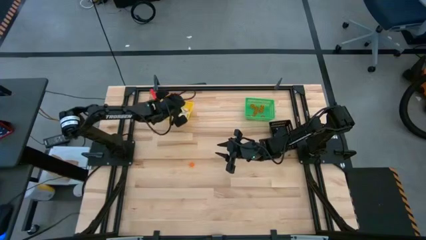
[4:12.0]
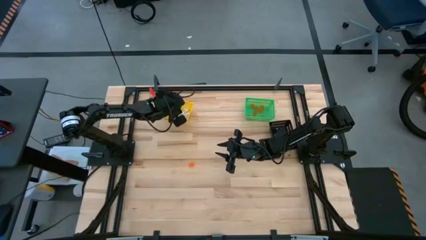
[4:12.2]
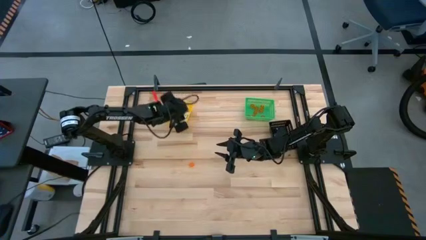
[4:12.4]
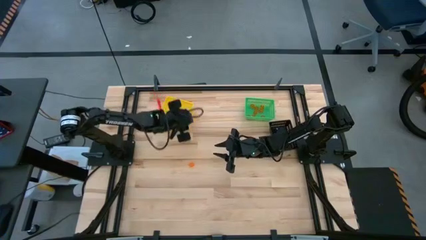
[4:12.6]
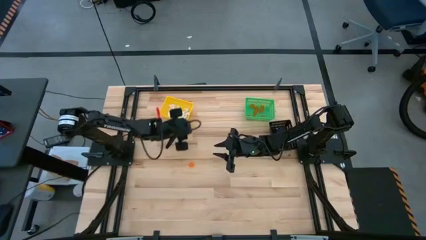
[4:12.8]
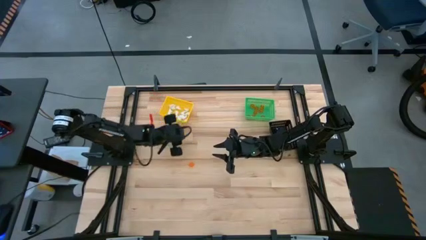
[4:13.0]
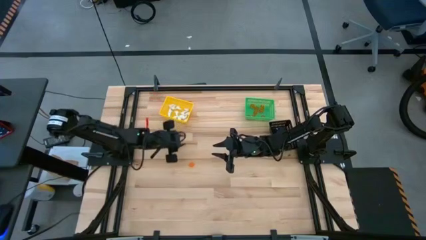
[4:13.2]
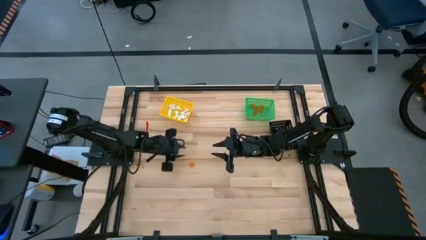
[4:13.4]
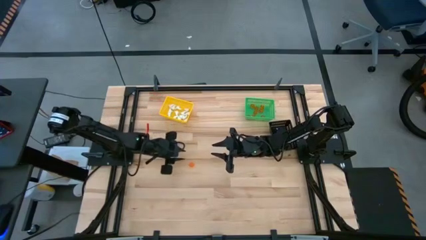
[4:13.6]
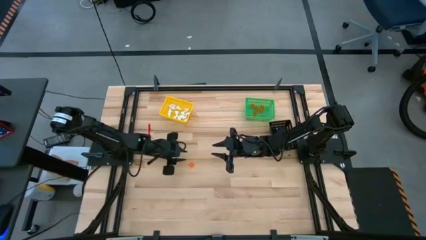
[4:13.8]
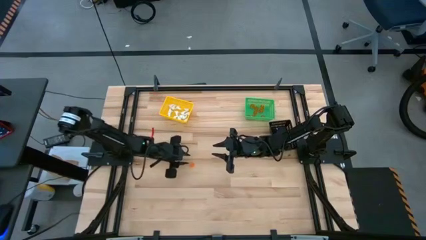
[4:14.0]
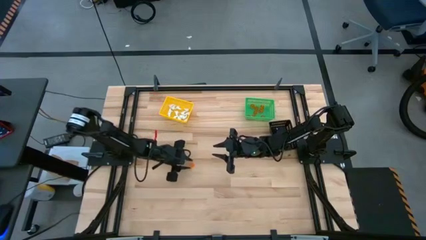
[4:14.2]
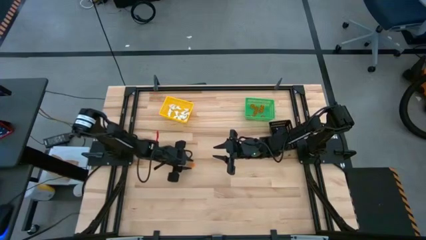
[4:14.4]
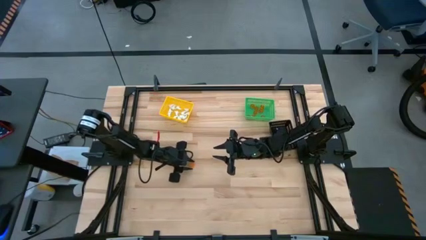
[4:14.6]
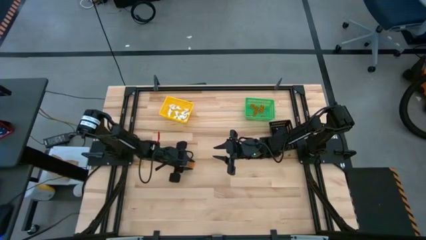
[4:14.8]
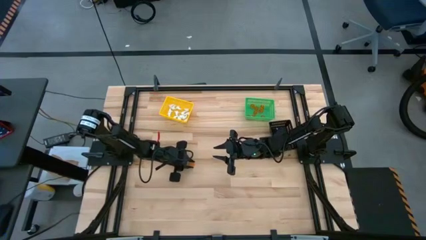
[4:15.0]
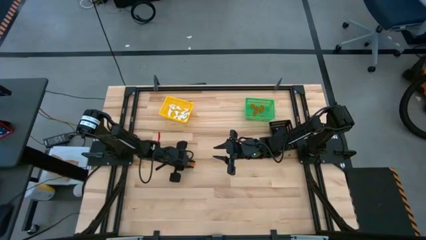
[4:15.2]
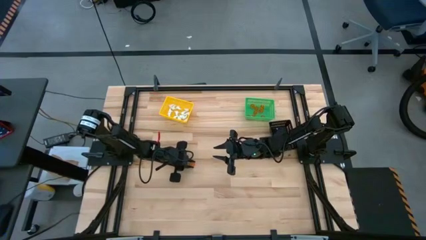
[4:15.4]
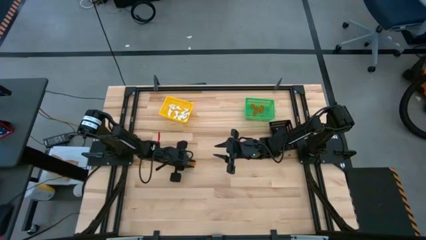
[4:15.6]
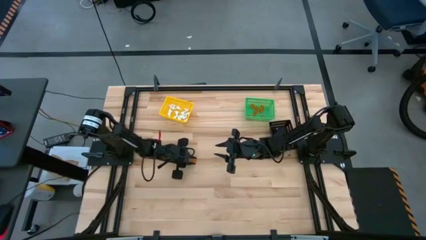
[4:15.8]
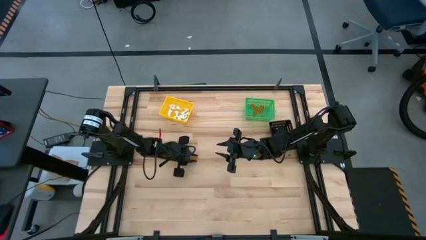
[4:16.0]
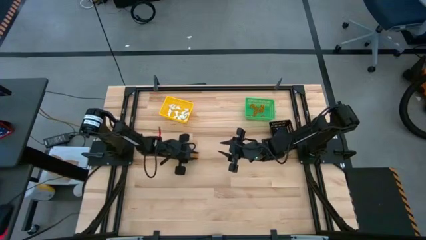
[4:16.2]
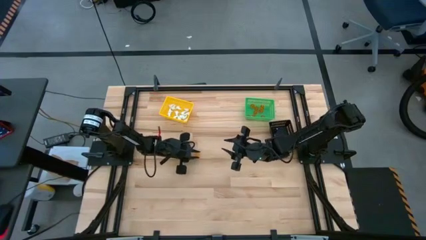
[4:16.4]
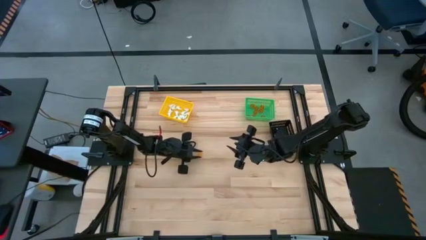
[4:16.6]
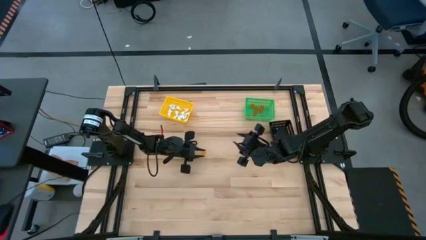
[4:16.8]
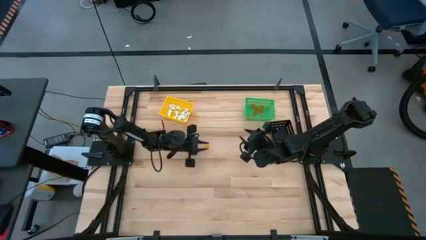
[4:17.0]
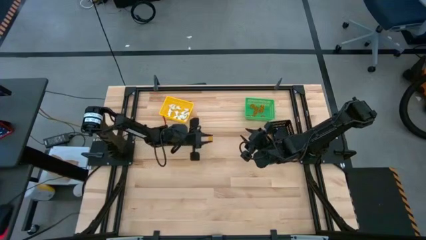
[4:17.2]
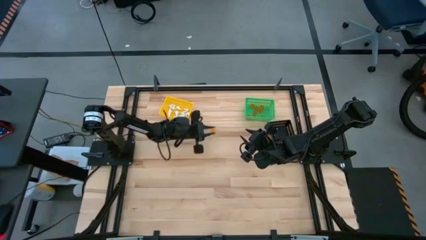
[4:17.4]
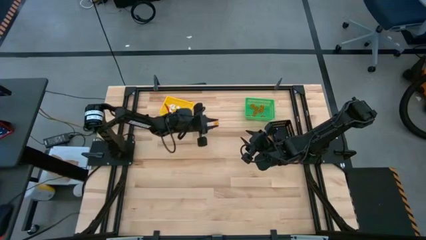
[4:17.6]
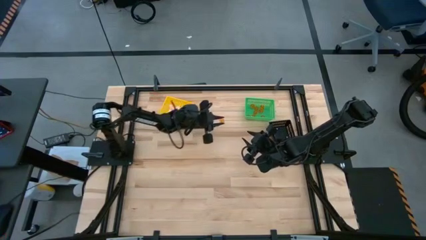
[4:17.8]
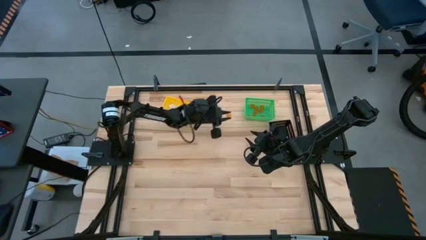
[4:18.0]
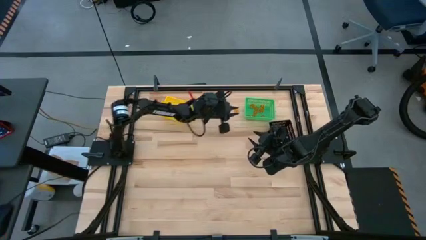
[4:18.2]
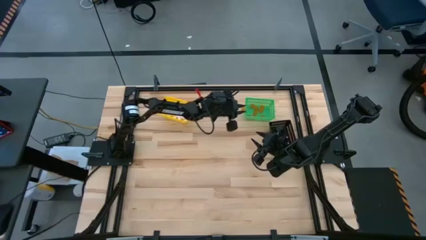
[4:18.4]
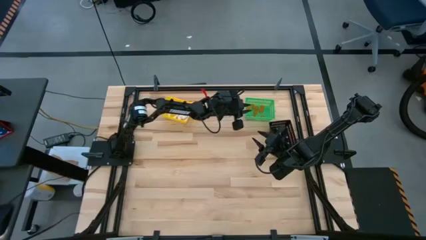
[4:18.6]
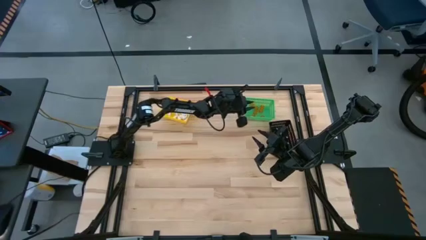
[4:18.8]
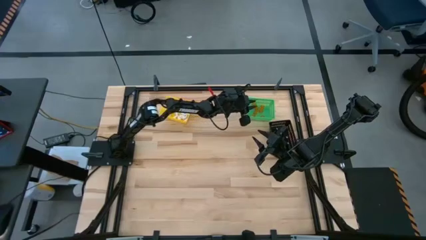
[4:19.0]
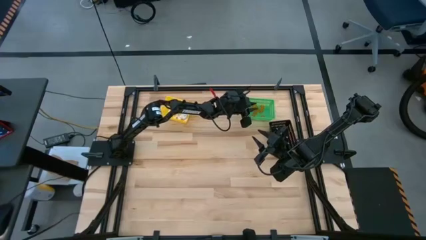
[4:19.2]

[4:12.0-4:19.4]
Task: Sort Halloween decoration
Put the orange pumpkin toy into the green bin

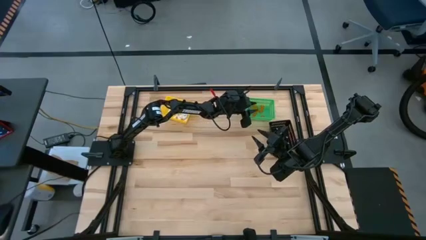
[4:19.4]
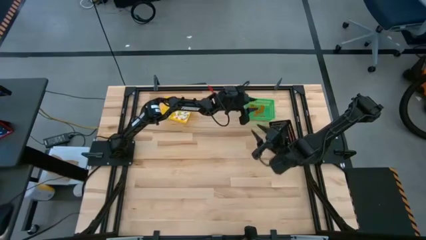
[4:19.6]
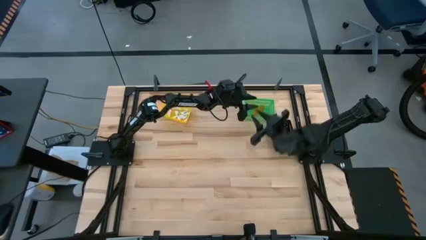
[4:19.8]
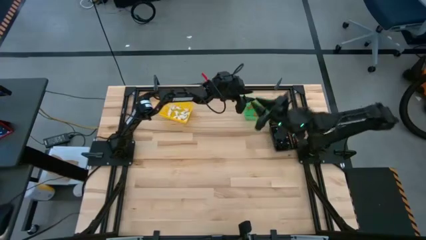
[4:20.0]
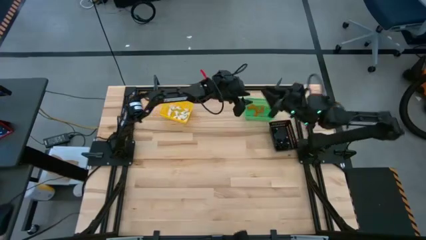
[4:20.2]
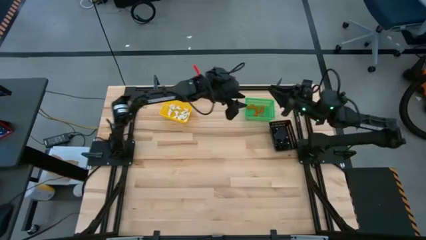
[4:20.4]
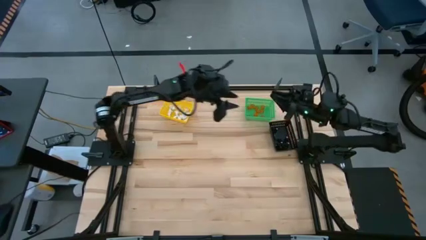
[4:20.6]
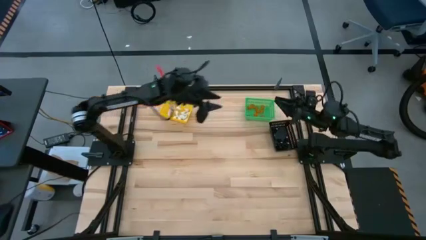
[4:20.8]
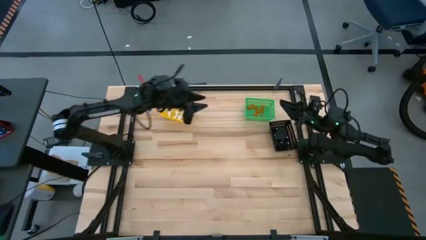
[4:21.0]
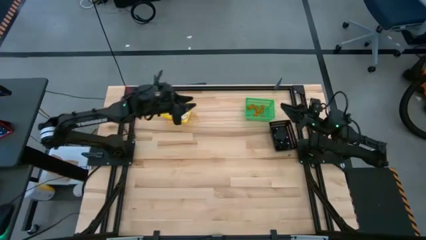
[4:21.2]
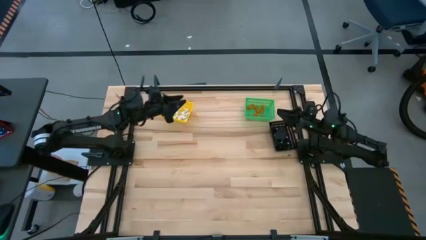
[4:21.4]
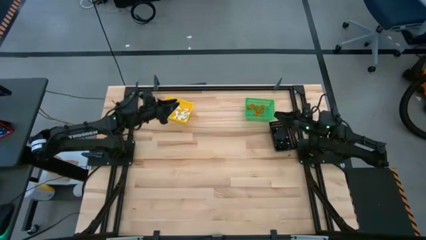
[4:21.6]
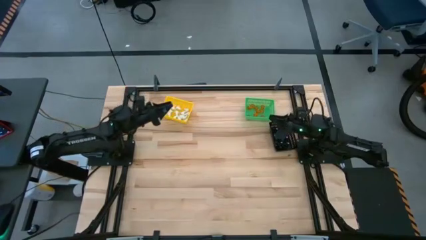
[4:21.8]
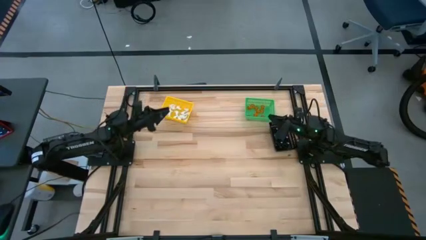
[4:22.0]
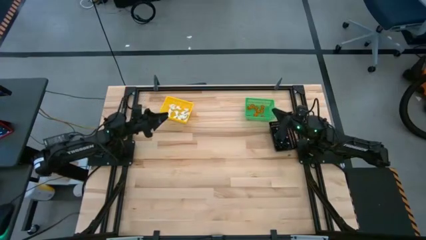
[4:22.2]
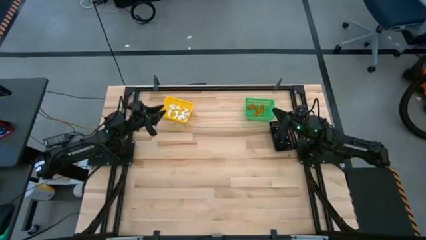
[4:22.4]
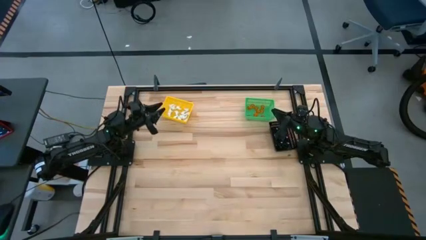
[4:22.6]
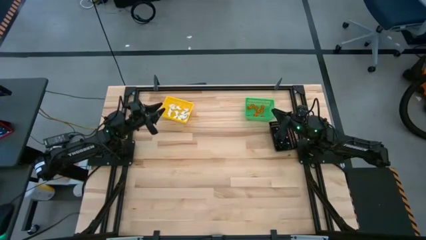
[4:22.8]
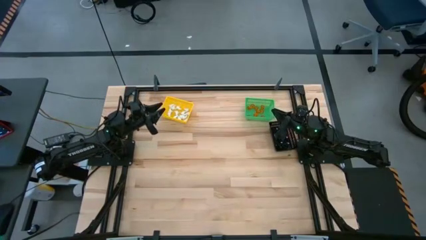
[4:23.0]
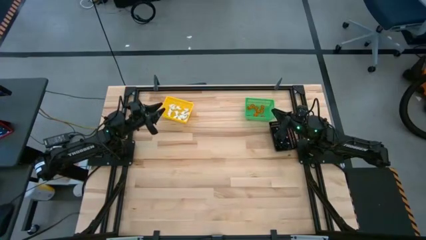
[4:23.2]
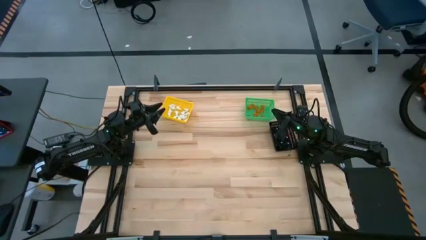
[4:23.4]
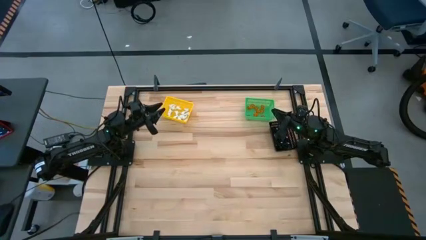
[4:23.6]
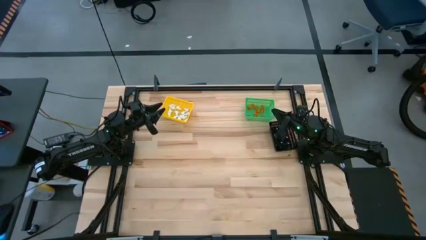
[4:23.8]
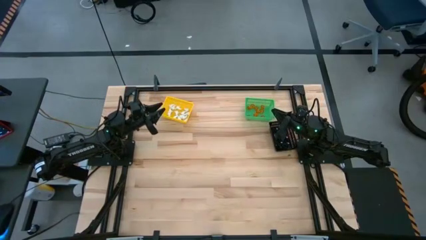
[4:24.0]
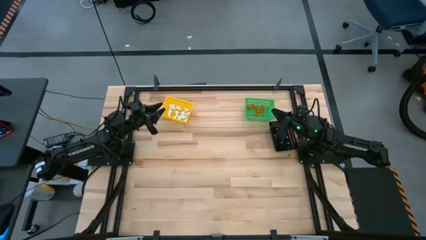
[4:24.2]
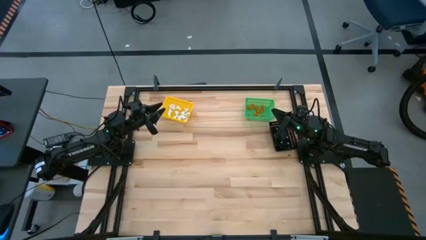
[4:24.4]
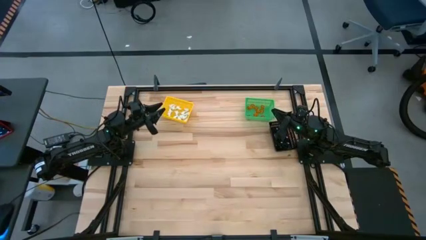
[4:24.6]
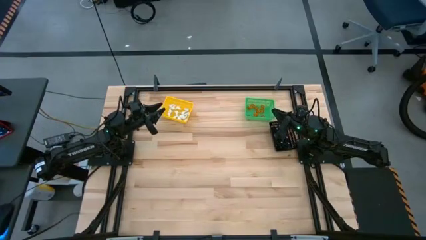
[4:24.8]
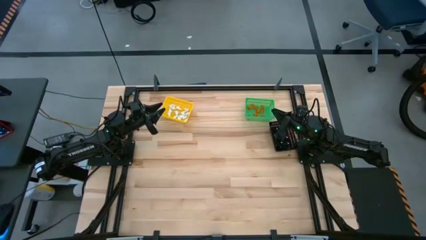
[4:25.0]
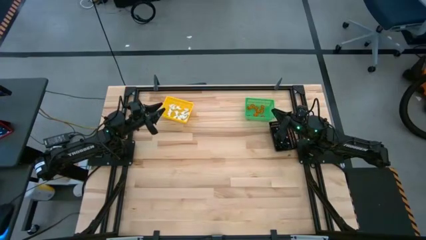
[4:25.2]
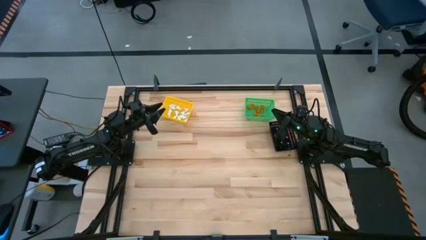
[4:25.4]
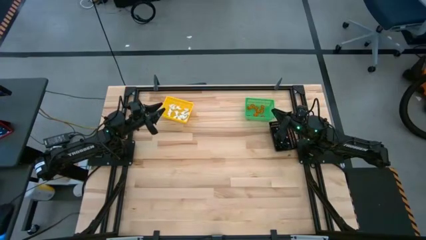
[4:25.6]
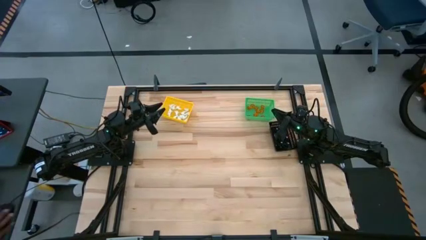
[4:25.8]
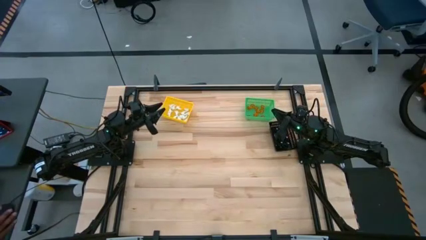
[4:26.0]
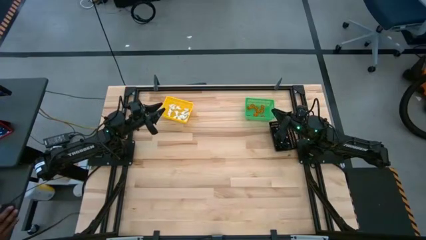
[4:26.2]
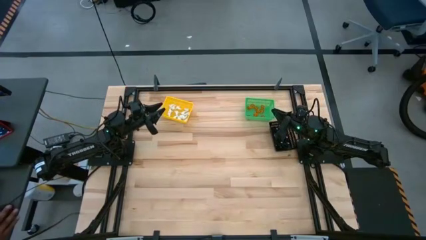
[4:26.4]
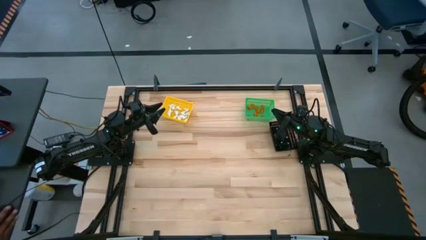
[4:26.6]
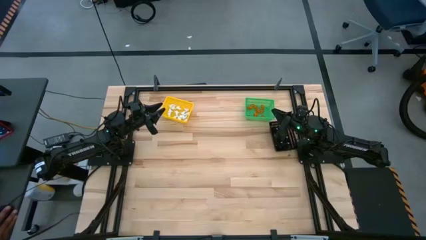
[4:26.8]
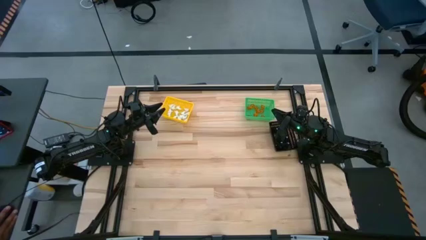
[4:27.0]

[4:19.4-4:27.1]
Return to Home Position
